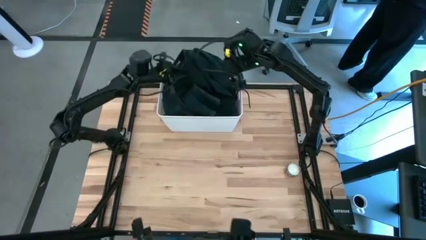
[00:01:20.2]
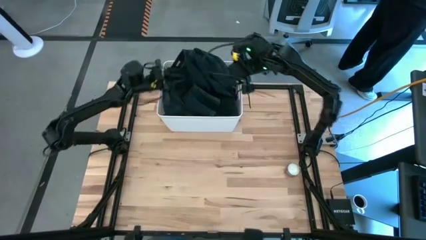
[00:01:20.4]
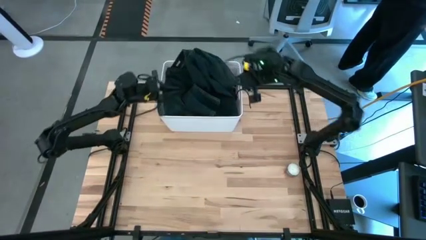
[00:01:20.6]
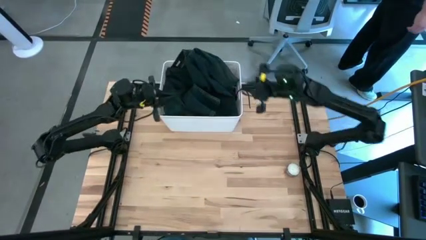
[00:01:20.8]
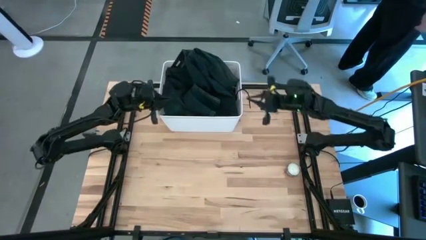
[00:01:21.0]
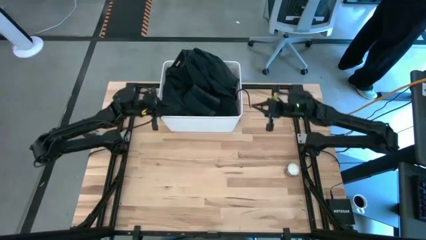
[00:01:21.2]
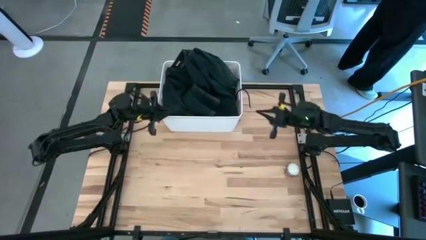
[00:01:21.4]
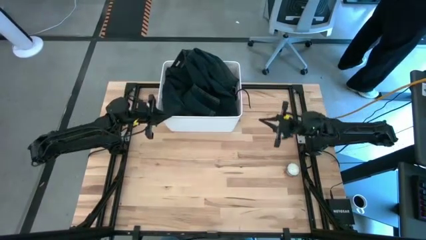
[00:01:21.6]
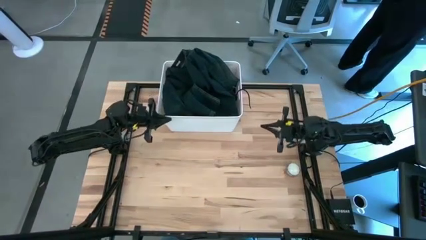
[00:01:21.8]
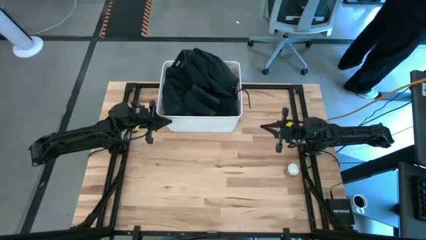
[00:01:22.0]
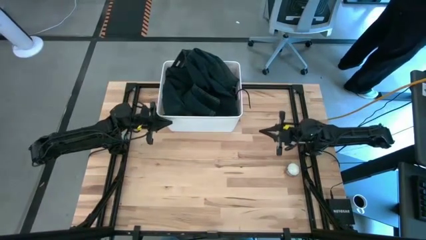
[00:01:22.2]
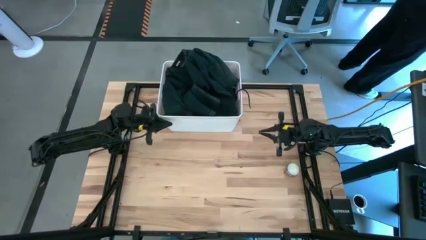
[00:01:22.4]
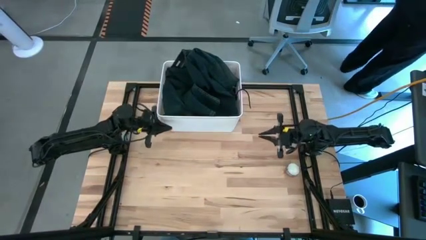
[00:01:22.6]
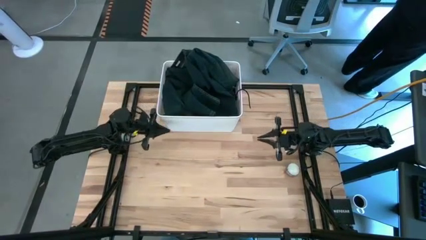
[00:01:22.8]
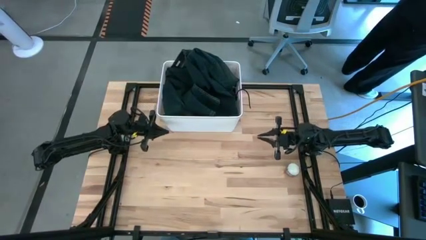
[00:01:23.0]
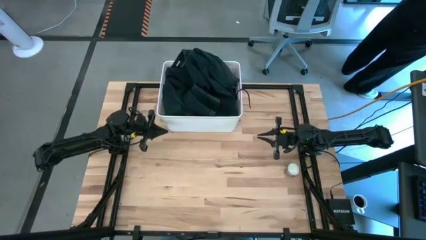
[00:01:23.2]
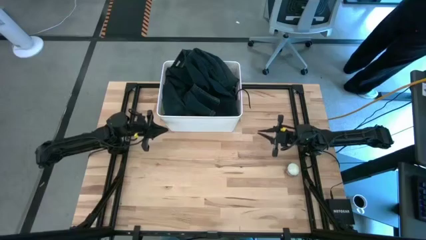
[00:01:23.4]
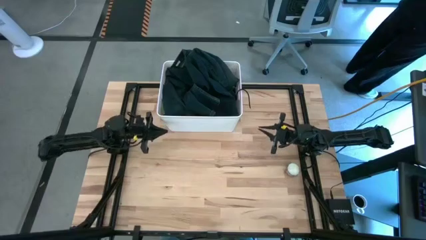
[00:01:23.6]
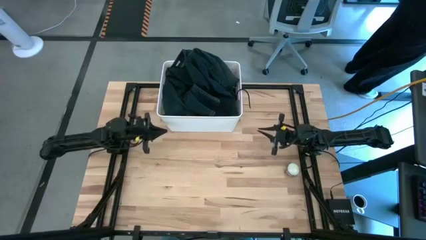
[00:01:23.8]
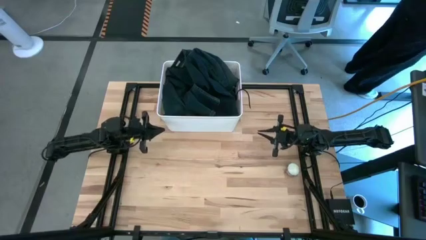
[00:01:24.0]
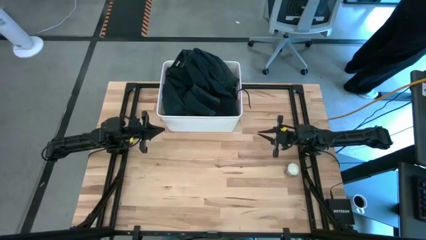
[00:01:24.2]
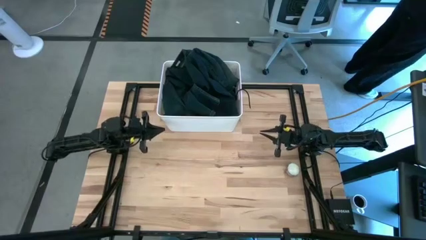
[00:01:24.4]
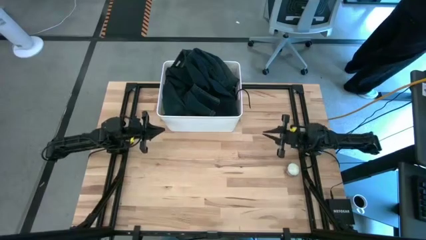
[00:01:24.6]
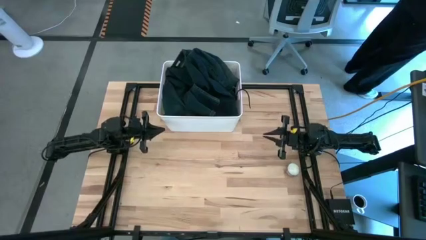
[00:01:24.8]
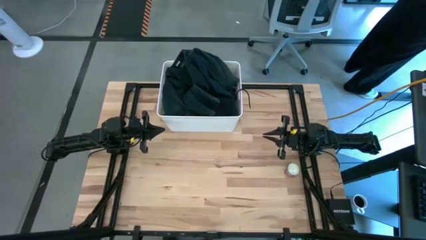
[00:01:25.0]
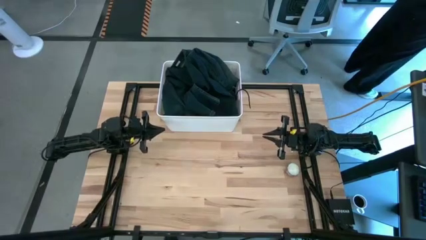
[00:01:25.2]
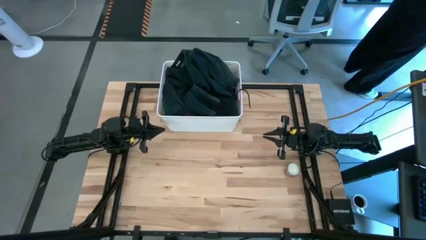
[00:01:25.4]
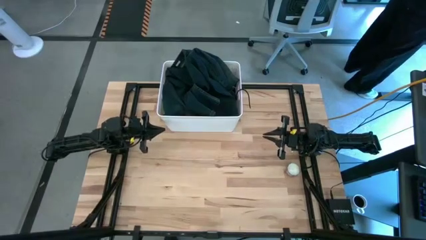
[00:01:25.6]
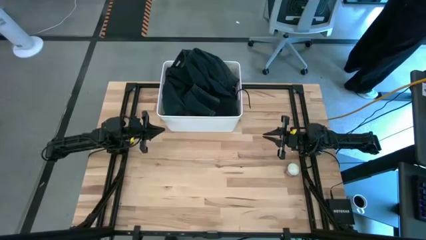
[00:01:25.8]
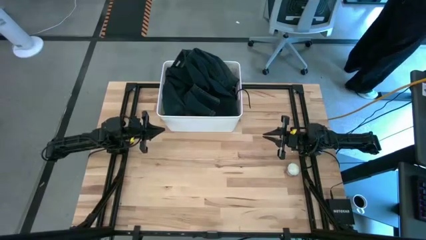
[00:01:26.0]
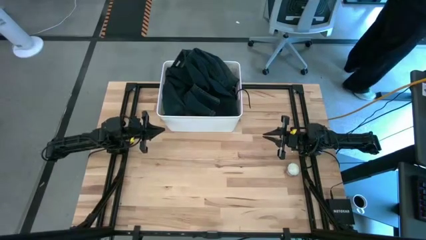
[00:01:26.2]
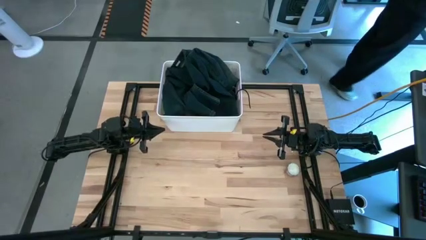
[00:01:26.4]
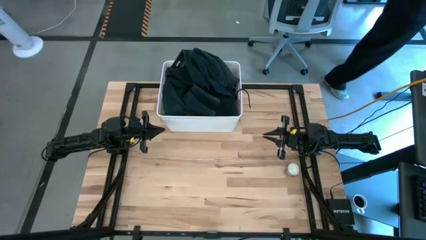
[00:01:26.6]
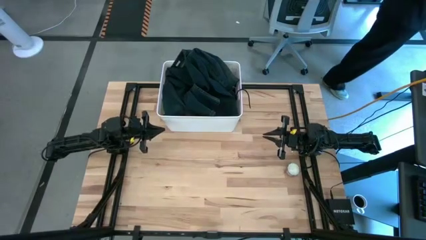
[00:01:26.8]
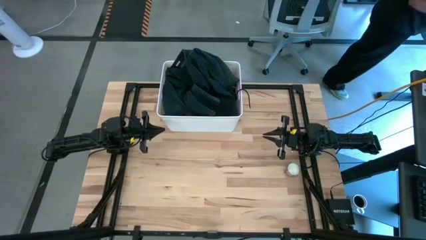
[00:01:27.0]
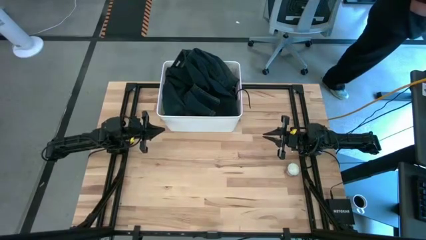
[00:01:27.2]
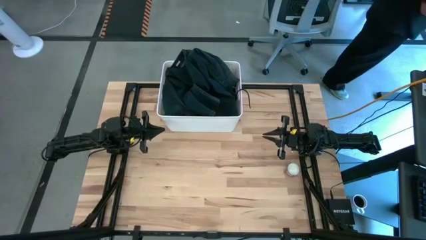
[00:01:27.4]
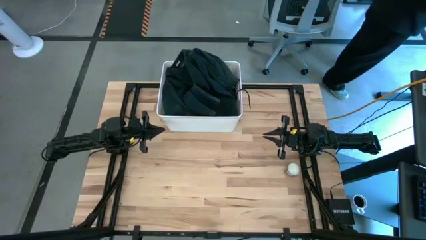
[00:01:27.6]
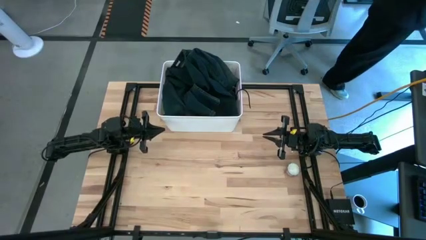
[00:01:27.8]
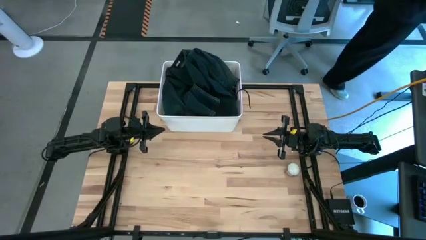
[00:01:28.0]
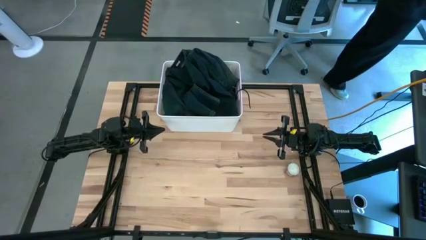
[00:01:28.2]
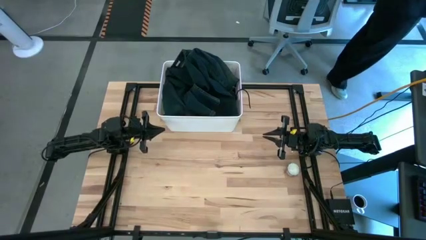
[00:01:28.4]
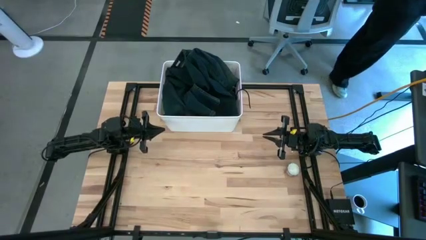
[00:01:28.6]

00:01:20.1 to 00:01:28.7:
Task: Sort clothes
Return to Home Position

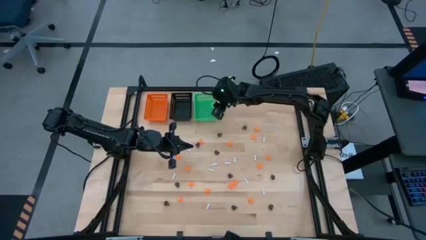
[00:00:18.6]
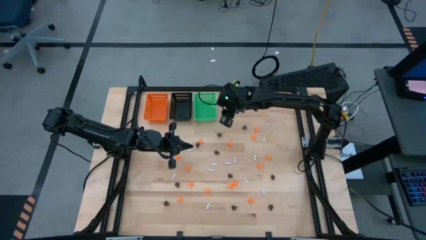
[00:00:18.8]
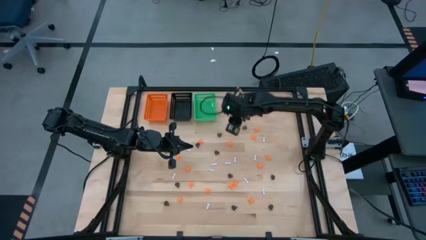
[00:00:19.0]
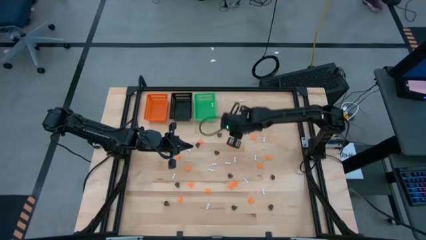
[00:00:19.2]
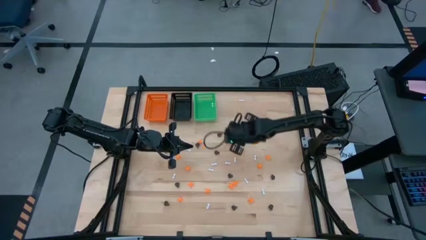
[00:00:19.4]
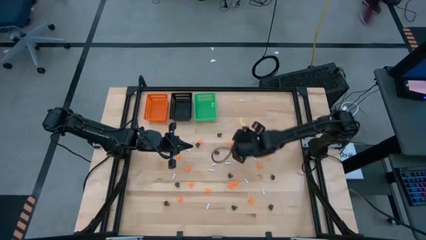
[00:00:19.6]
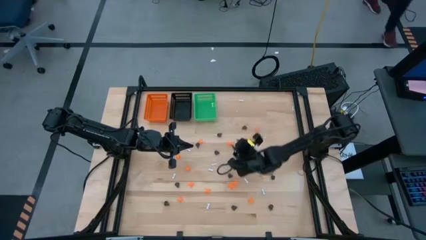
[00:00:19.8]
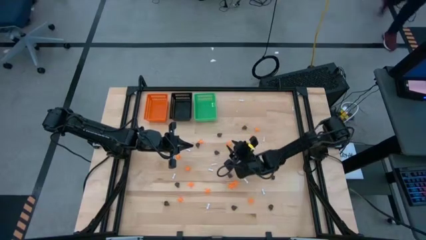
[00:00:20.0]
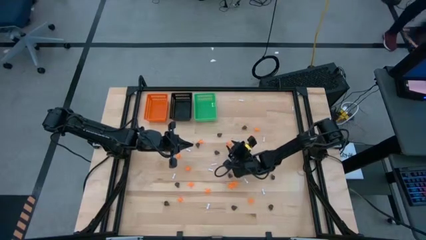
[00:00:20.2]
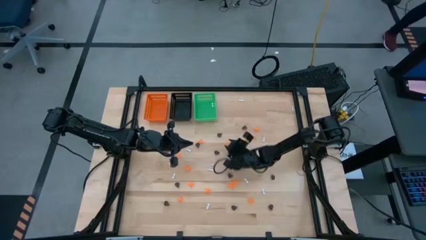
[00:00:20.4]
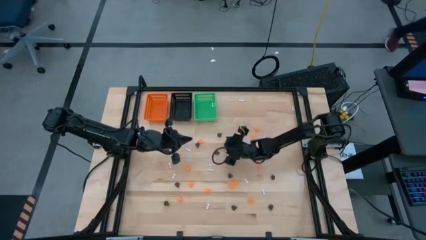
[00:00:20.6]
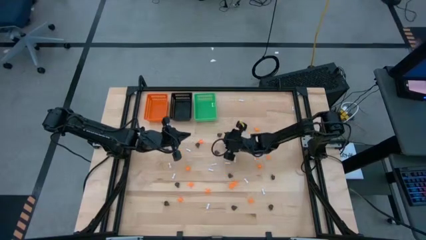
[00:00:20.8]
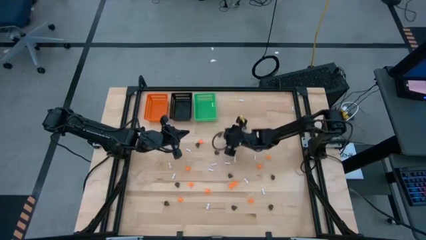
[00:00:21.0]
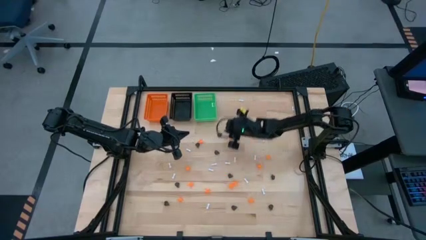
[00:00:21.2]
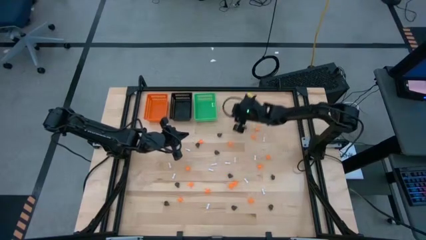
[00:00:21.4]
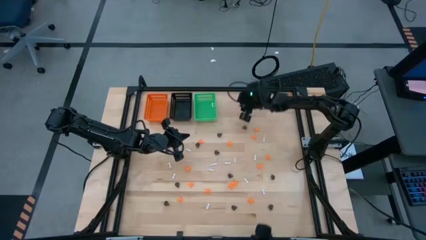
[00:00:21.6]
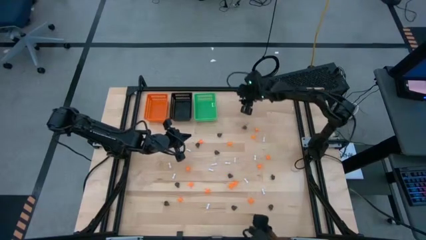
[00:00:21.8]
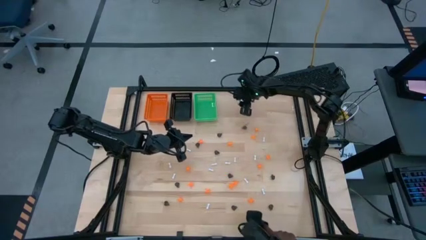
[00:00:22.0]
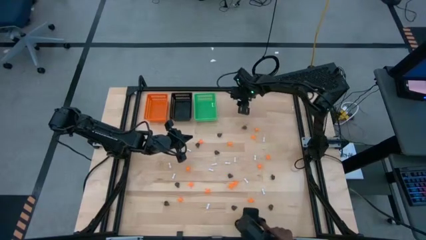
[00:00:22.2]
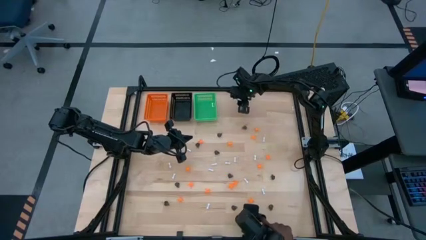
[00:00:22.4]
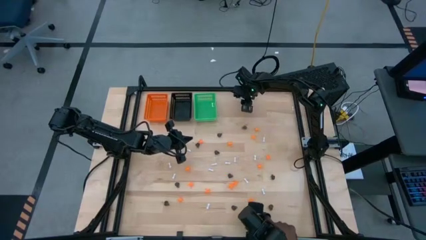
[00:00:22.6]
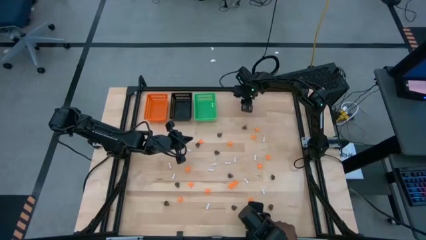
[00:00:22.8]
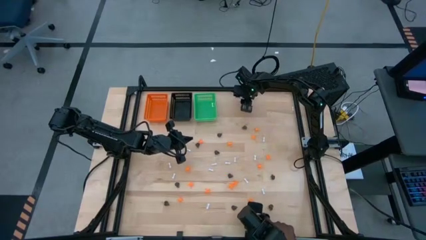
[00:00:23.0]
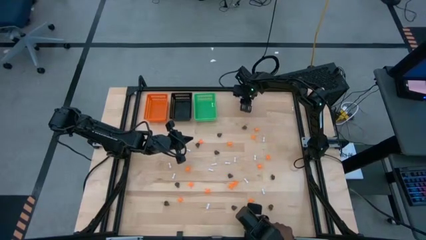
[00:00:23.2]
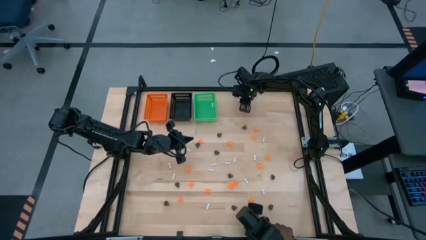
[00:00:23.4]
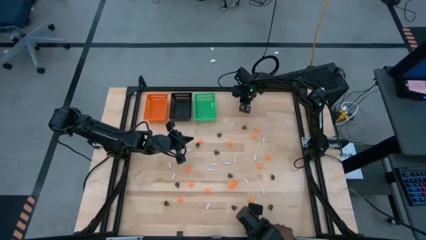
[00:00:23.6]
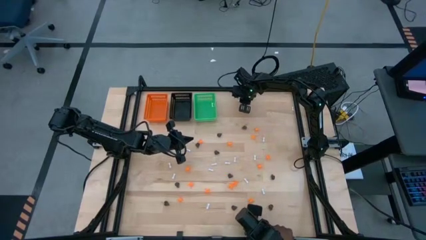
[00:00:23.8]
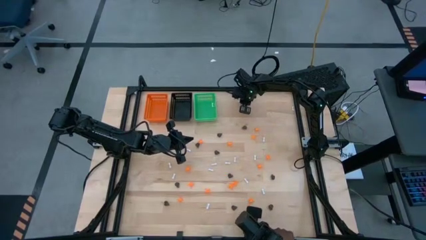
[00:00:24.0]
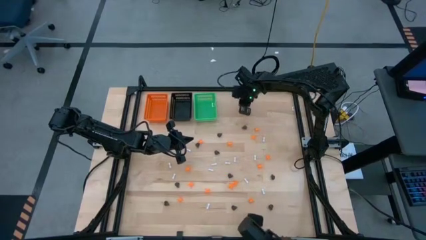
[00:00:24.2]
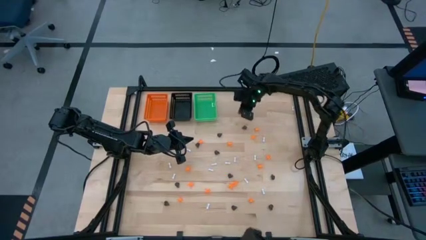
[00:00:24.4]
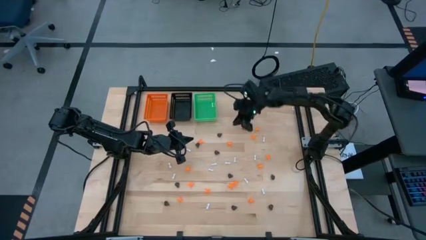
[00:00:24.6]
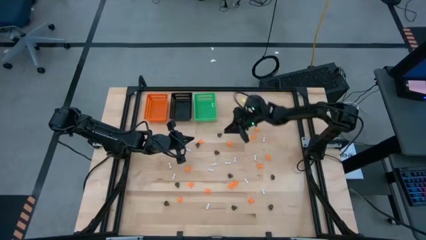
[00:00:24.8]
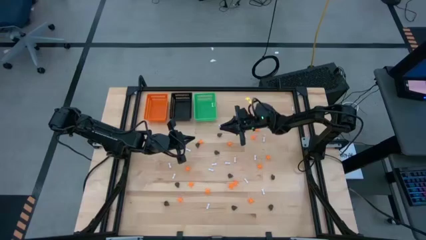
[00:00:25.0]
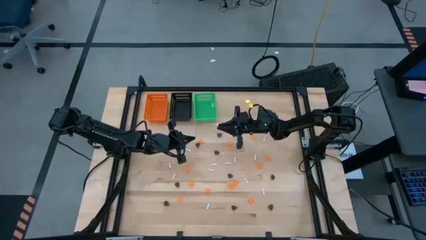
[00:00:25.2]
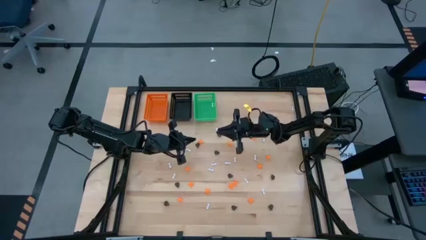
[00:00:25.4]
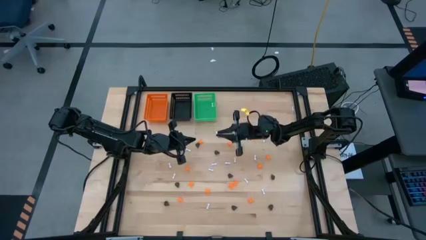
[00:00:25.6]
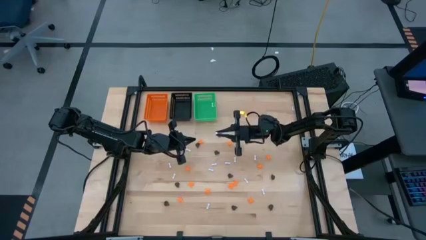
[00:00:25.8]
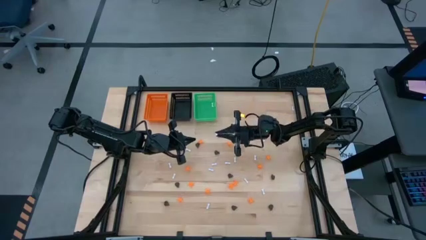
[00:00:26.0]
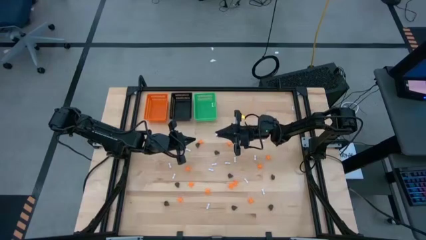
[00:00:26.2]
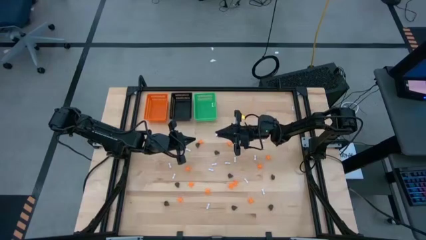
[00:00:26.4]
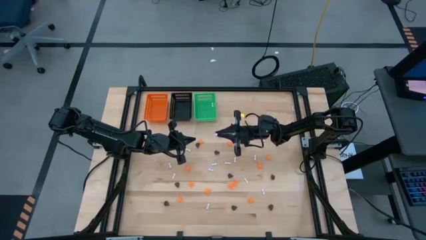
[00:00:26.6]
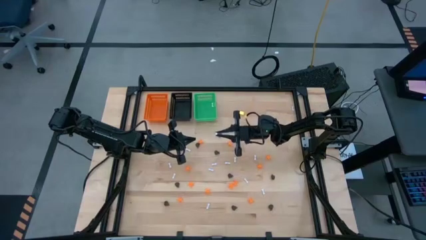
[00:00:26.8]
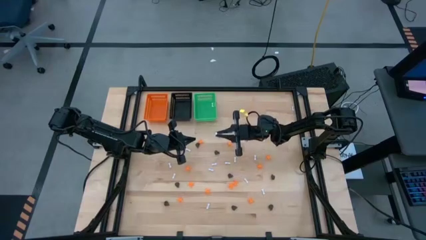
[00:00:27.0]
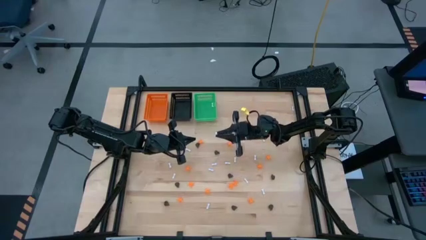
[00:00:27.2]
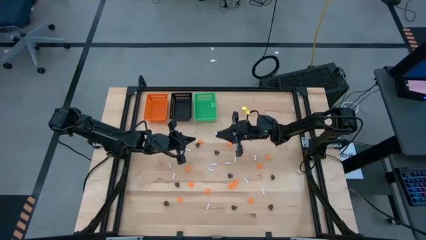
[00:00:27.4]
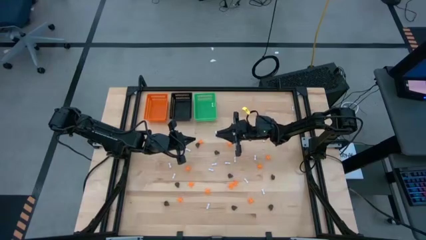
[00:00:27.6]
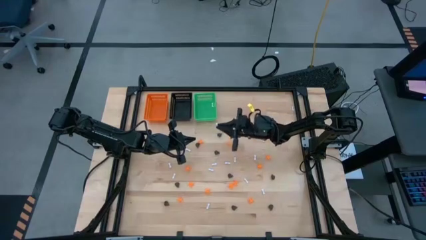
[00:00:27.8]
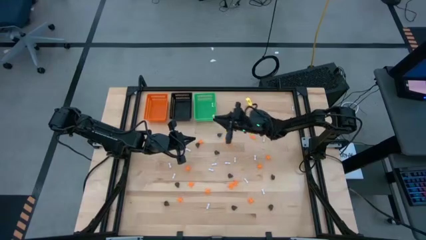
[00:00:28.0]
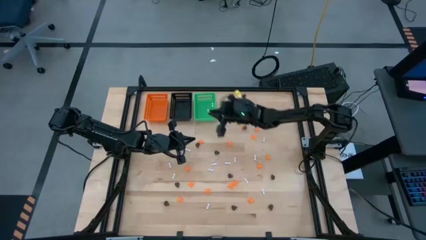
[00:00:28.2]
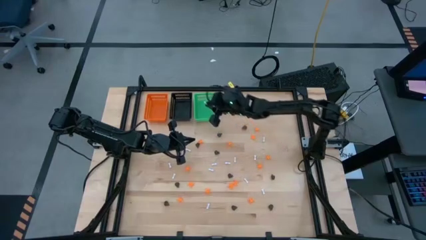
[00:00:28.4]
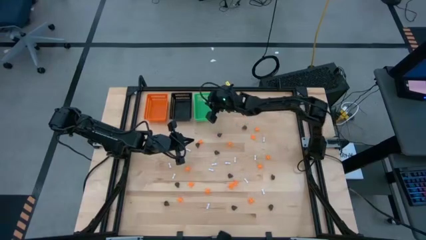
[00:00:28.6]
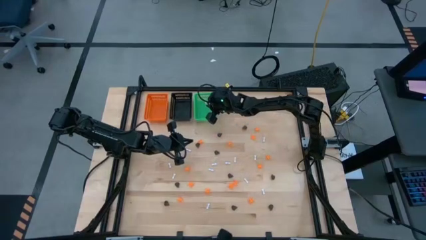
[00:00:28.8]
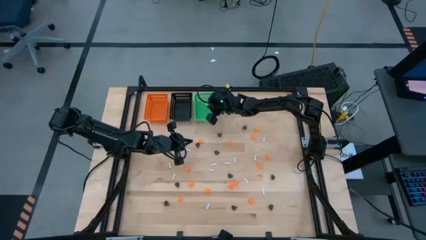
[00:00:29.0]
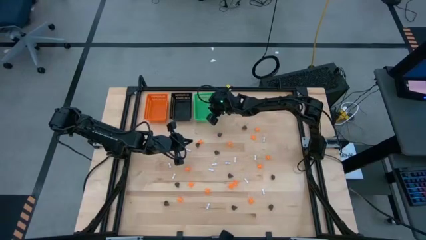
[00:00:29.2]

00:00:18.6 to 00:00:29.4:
Task: Sort Halloween decoration
Put the white bone toy into the green bin
